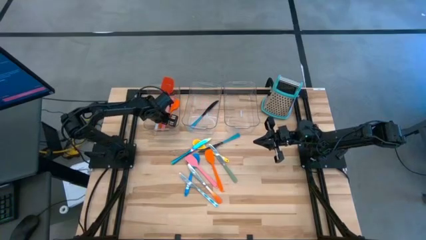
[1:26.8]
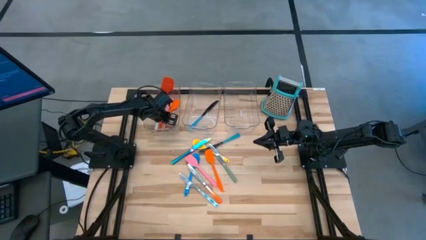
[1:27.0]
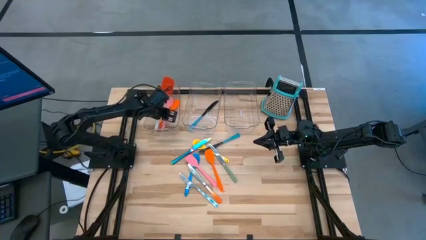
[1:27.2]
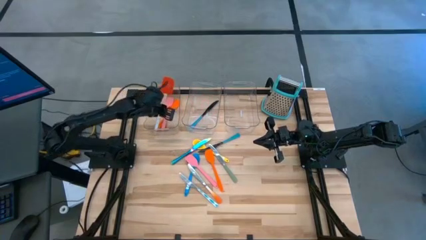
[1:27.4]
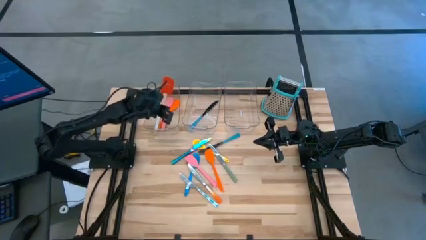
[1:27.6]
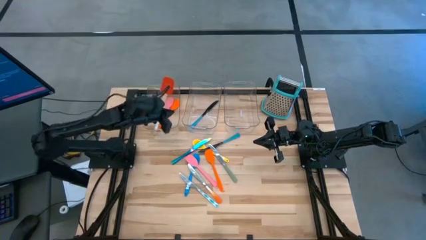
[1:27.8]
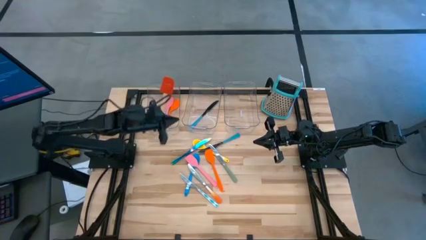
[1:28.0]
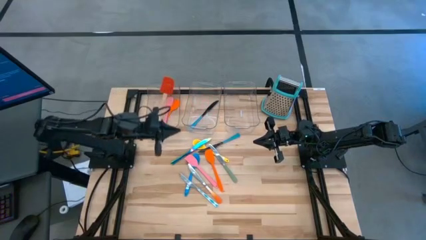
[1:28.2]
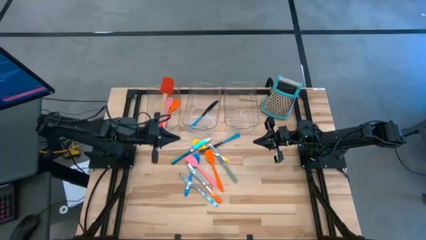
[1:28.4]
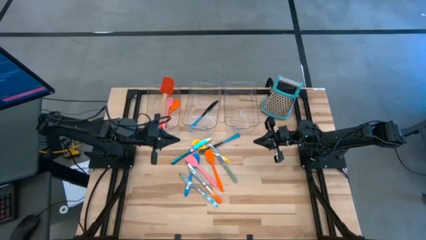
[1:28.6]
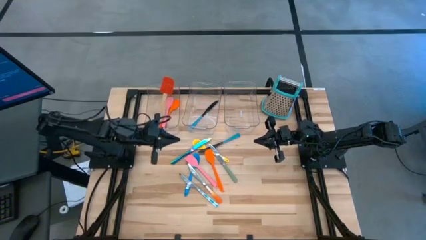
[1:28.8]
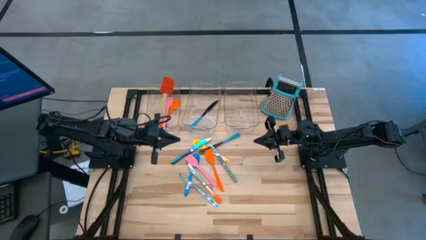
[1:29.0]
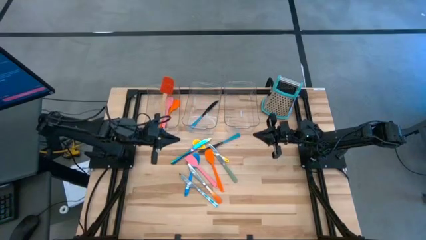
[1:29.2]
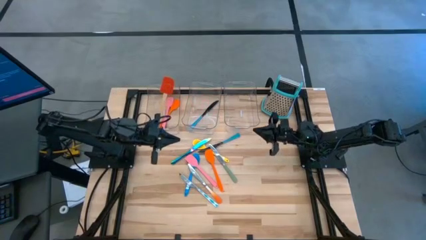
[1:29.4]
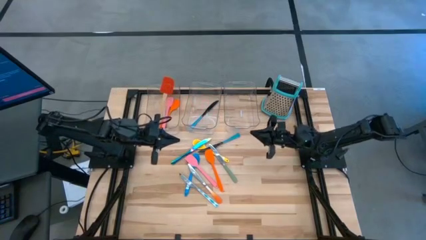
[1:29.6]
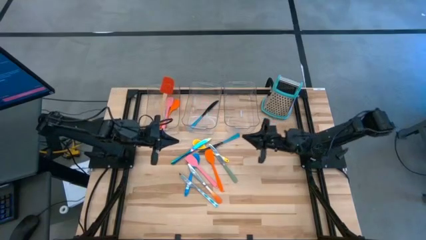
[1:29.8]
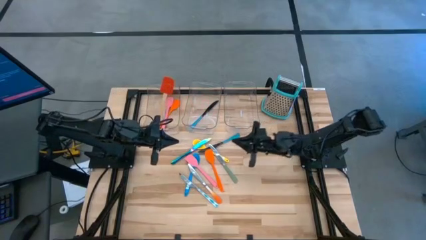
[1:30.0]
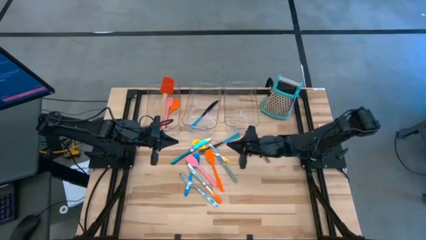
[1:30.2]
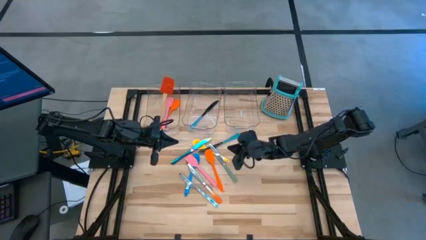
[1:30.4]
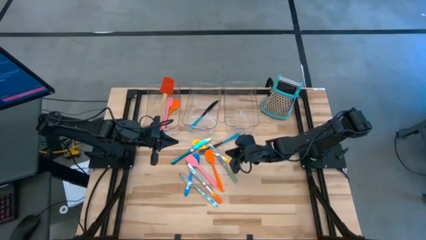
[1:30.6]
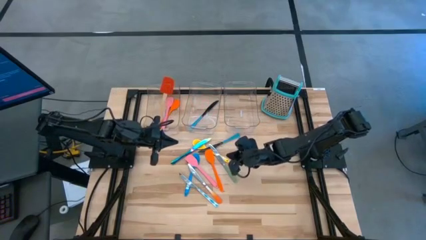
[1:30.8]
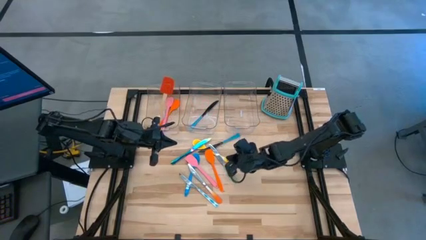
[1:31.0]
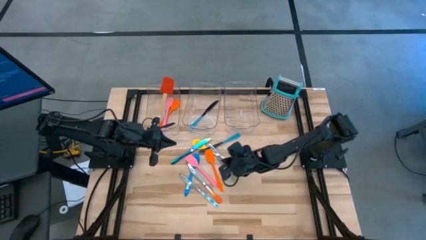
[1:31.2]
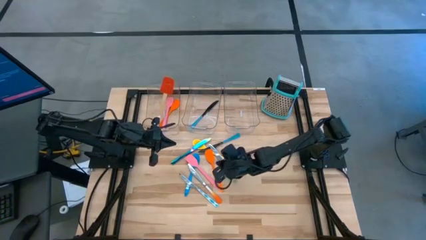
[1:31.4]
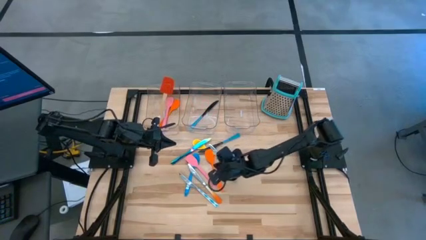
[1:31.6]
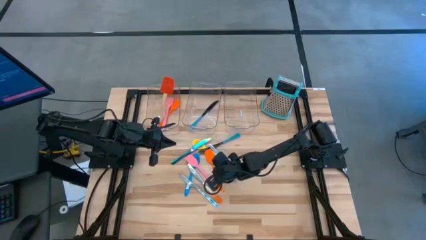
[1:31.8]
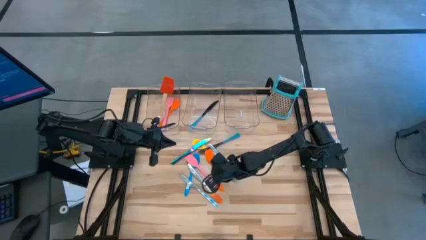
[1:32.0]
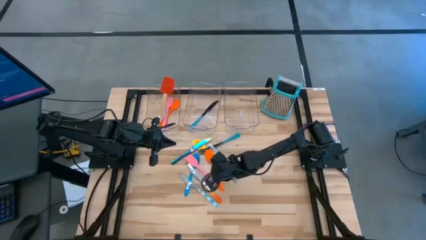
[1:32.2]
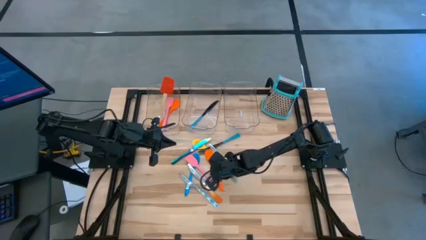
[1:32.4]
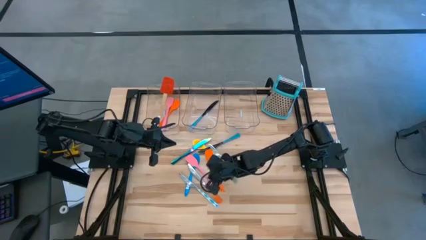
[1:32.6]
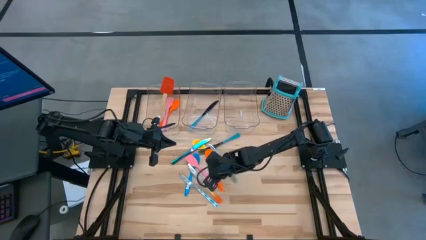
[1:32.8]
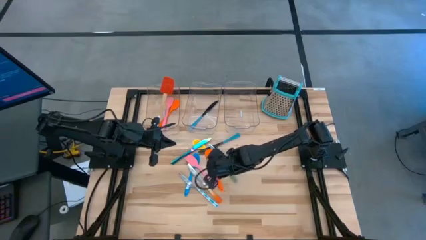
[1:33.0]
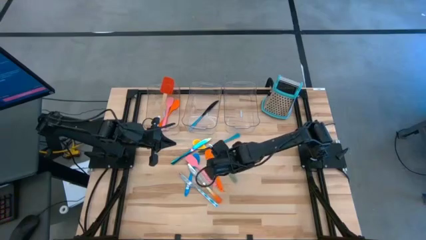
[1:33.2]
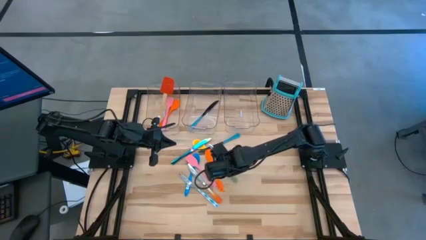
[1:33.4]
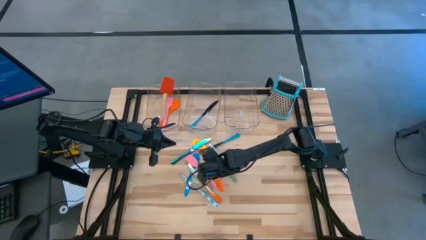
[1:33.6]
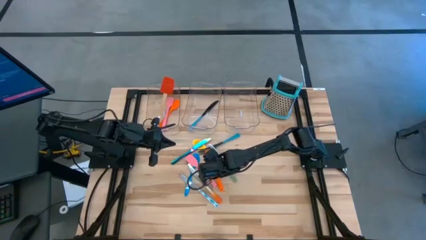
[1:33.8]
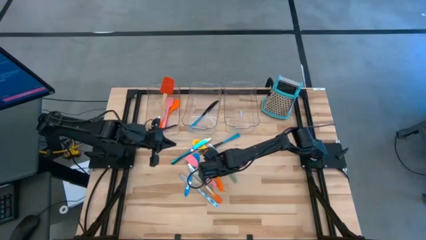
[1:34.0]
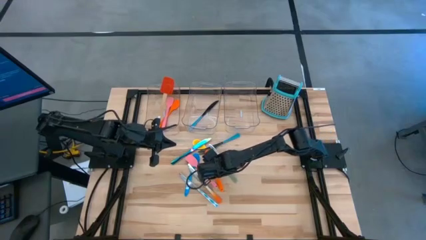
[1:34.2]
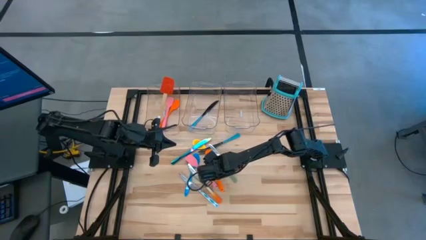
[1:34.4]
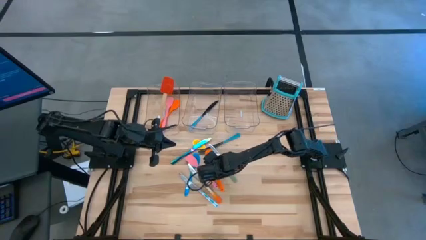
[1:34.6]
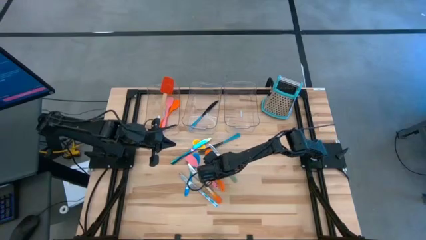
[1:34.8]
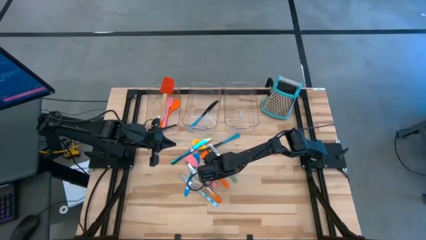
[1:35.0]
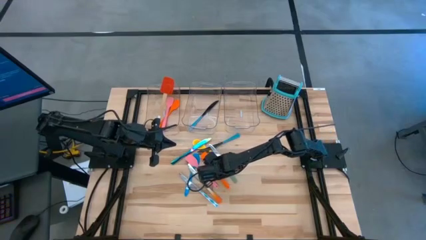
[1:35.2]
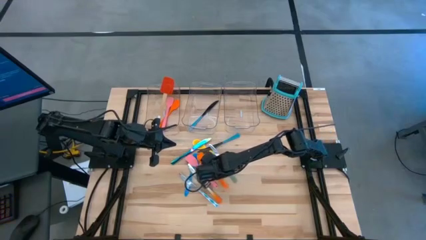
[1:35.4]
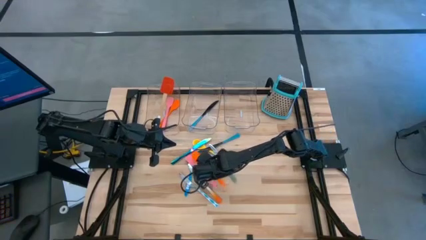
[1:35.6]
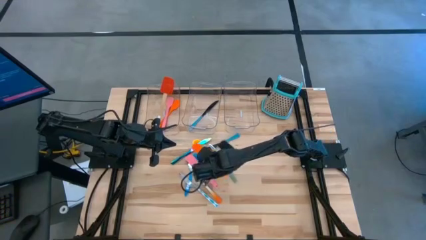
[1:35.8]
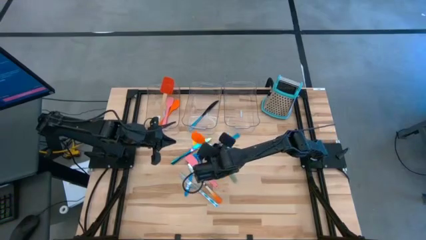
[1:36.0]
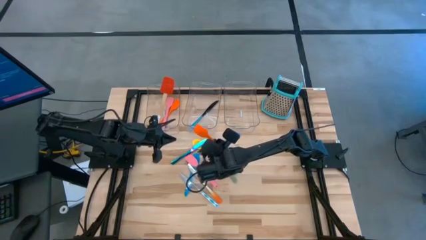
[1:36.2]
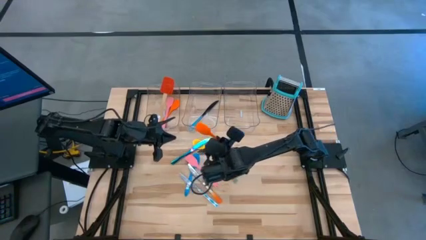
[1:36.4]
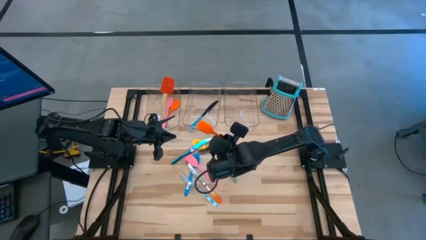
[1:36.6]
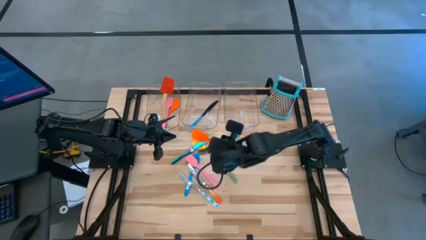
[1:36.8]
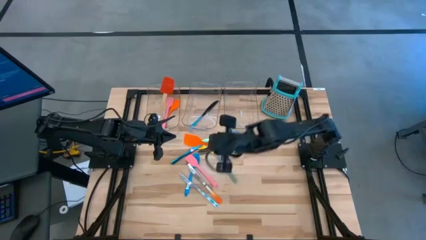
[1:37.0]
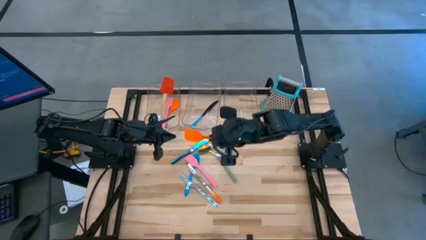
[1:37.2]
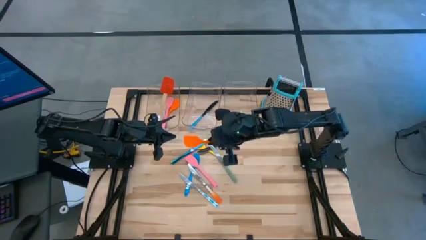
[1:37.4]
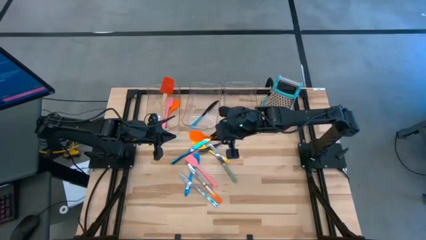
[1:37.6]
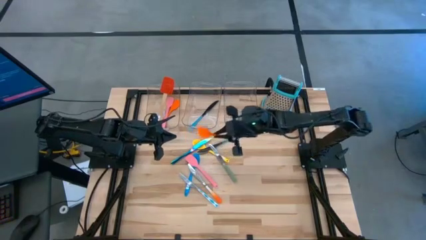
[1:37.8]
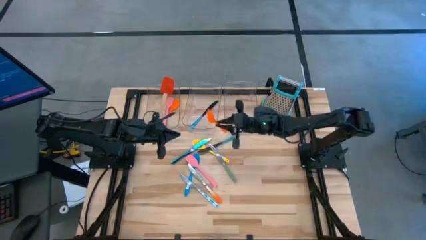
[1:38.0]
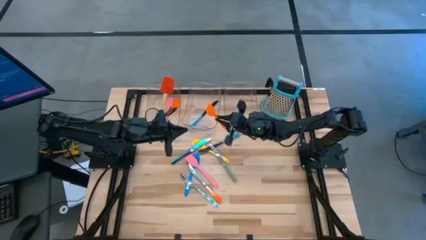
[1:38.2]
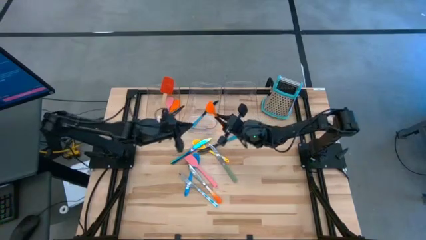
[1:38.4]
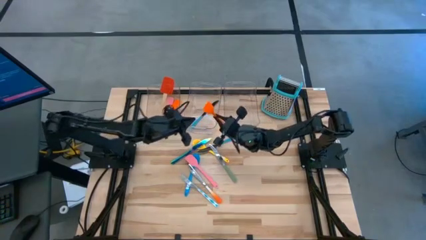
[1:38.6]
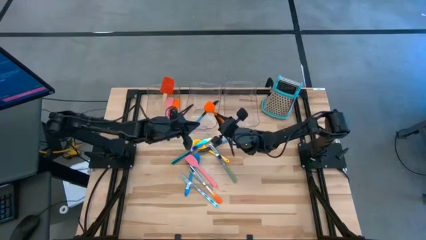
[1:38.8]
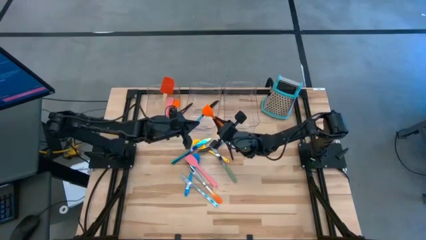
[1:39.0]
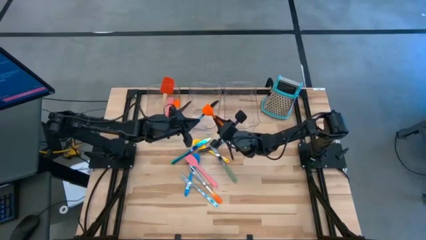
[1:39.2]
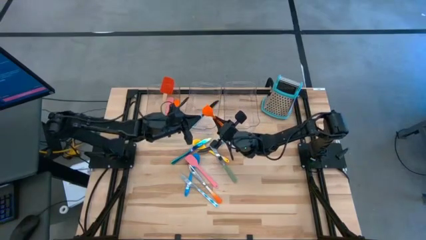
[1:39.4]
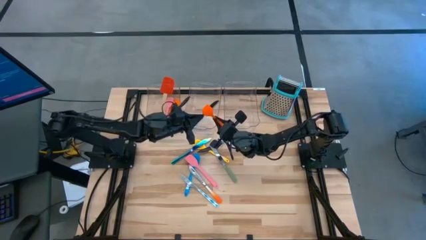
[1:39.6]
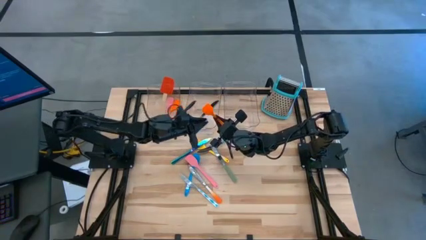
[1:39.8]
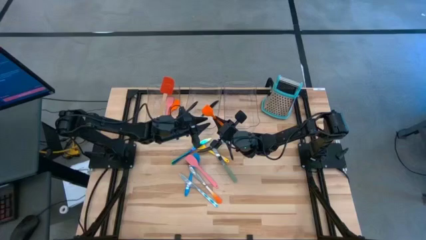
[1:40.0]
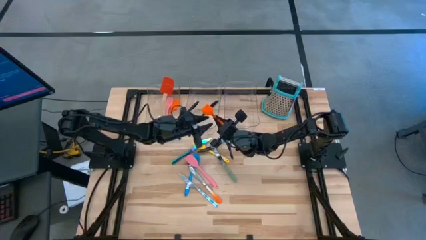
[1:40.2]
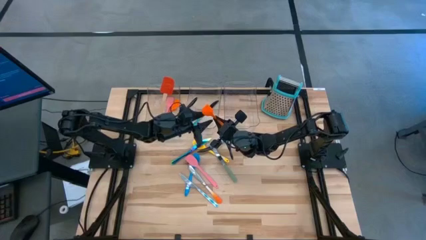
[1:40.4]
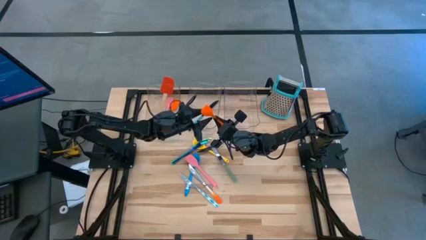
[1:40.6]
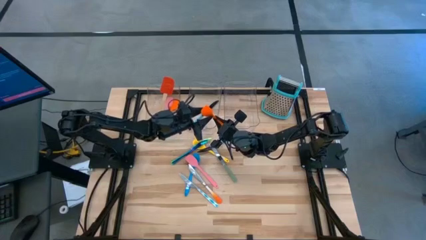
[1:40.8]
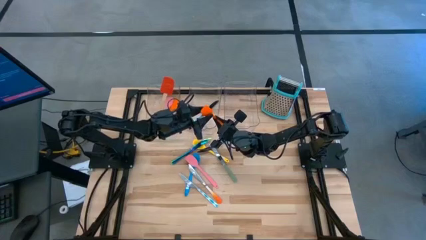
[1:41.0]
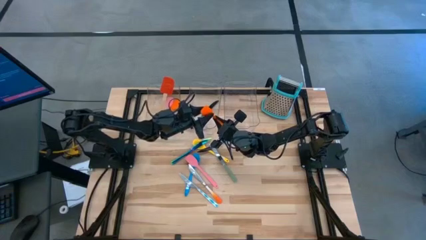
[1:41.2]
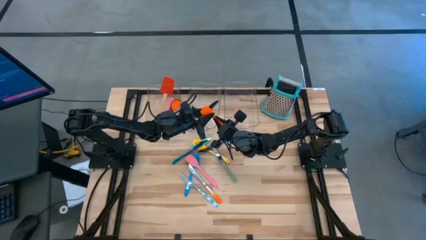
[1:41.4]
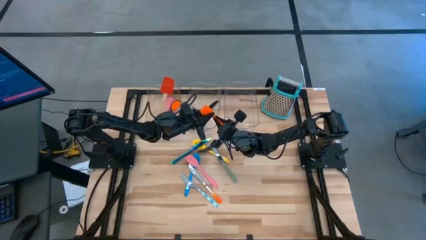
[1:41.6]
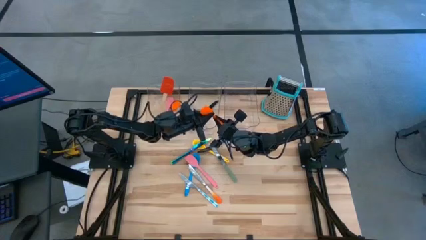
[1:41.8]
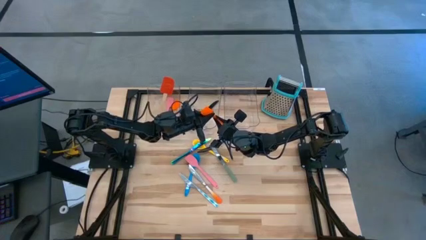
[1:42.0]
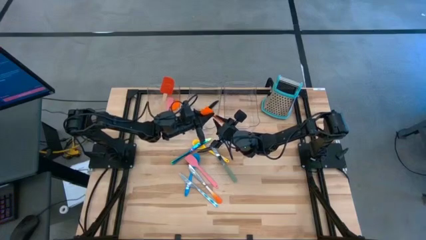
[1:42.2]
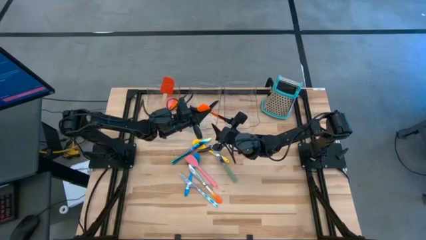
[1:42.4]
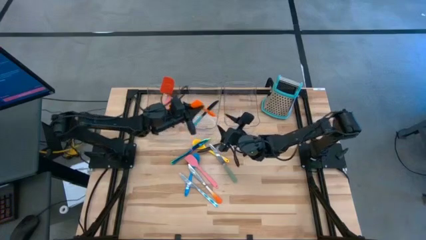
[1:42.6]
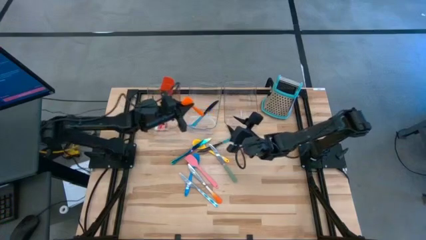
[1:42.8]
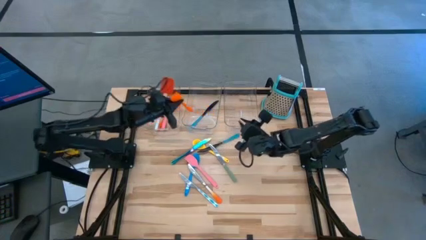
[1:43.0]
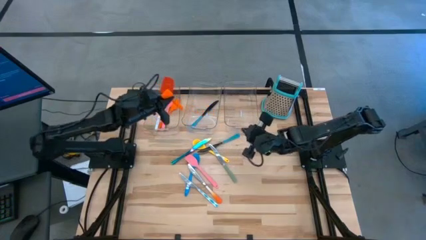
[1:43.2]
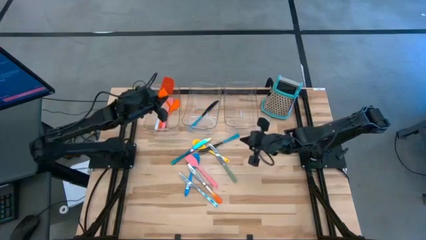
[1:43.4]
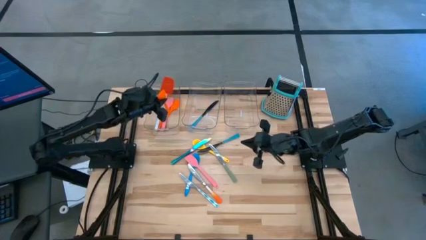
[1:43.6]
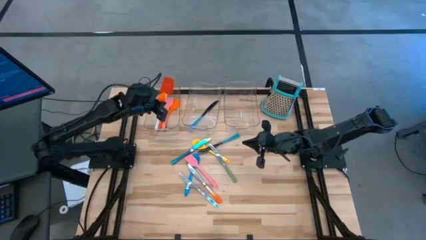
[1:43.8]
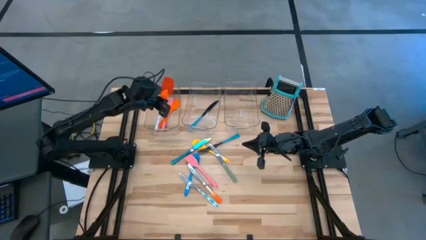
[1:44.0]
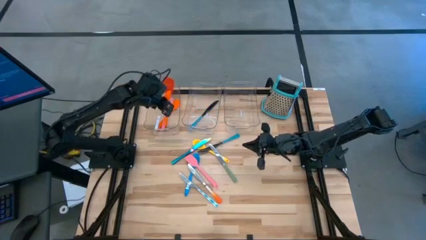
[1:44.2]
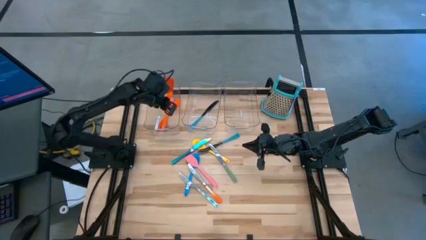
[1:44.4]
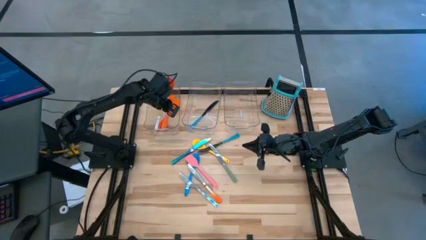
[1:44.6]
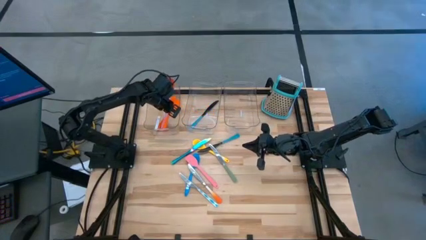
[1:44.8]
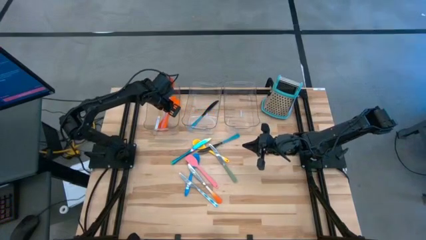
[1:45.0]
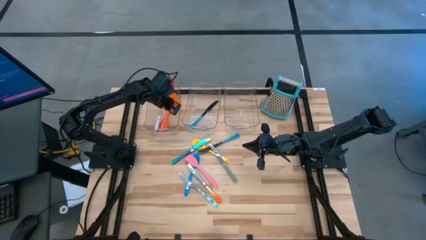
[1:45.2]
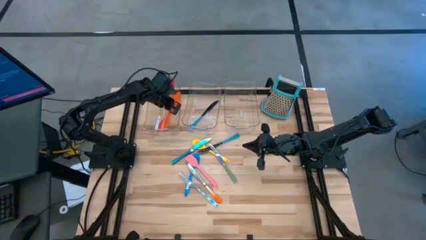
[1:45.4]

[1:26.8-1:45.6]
Task: Pick & Place Kitchen Items
Put the orange spatula into the left transparent bin
